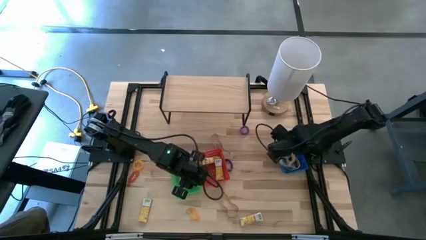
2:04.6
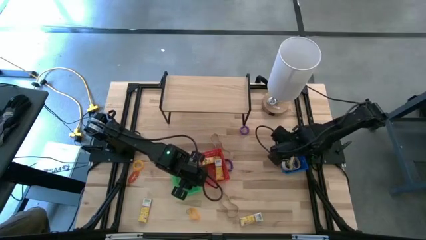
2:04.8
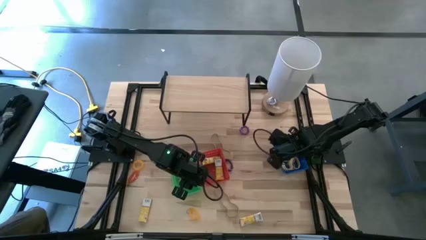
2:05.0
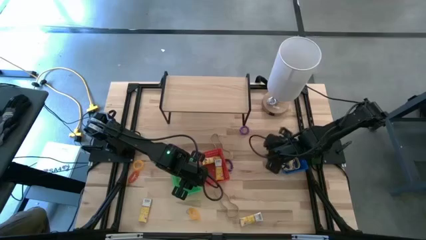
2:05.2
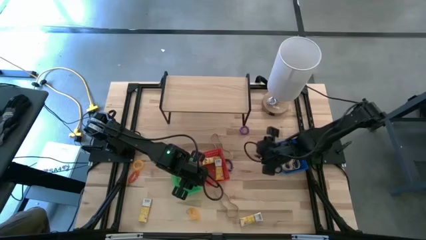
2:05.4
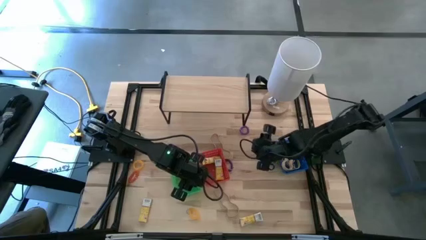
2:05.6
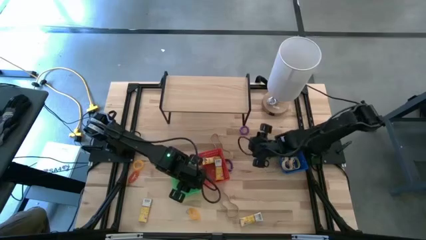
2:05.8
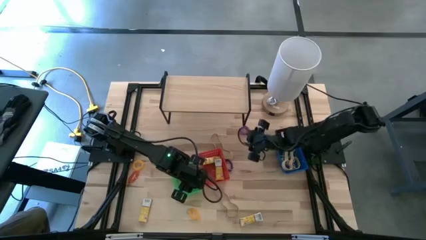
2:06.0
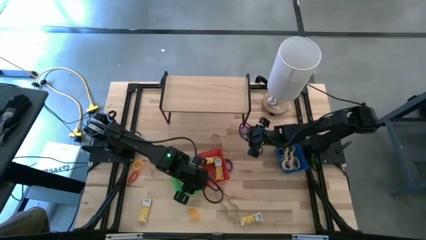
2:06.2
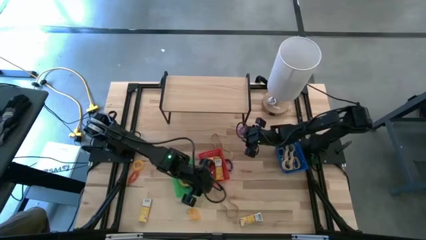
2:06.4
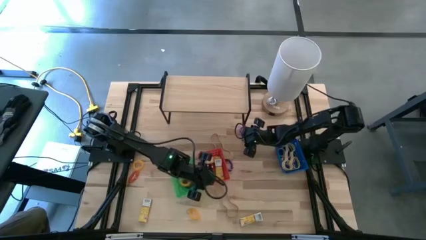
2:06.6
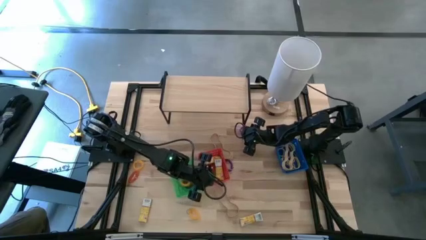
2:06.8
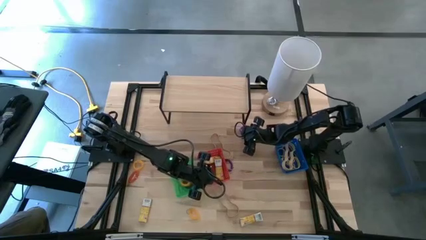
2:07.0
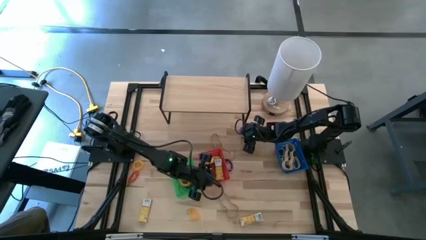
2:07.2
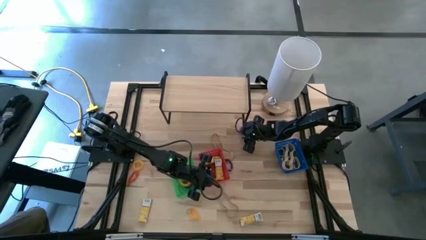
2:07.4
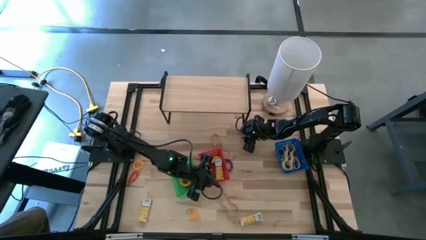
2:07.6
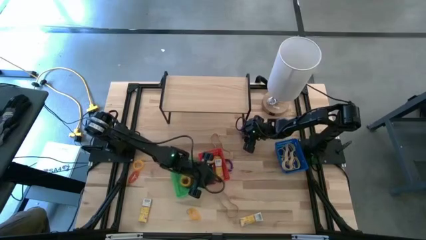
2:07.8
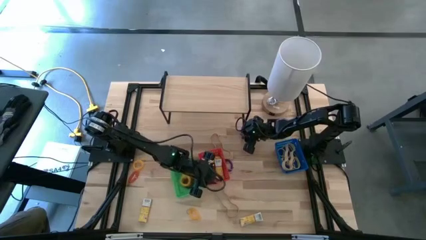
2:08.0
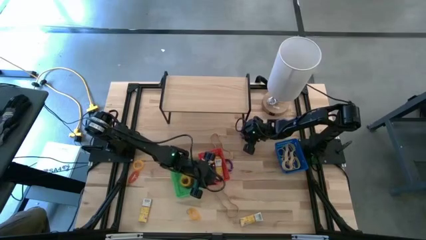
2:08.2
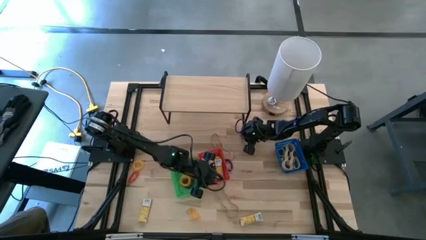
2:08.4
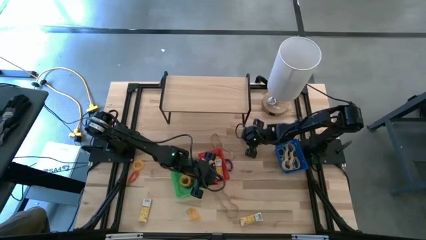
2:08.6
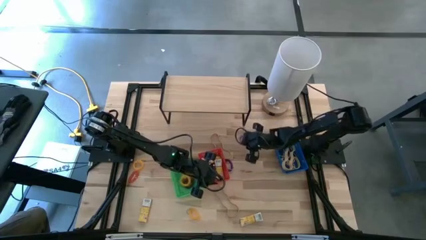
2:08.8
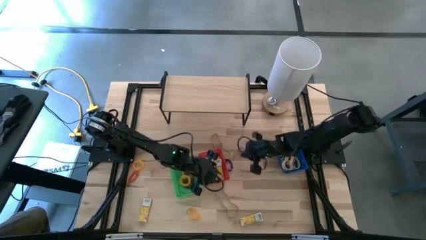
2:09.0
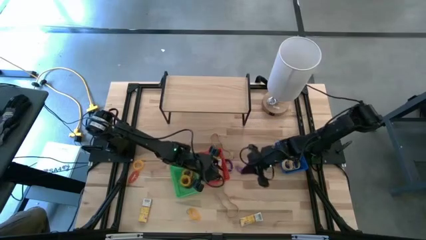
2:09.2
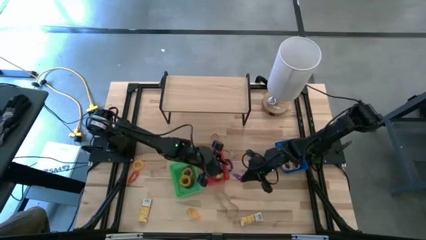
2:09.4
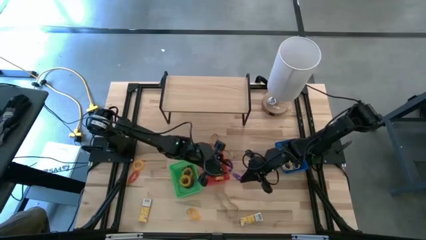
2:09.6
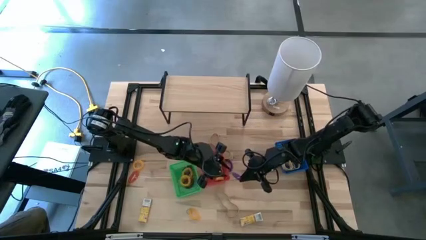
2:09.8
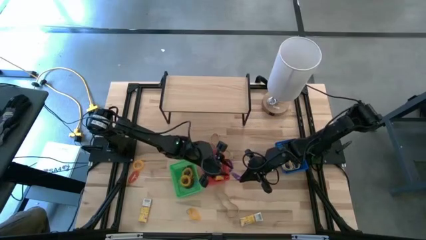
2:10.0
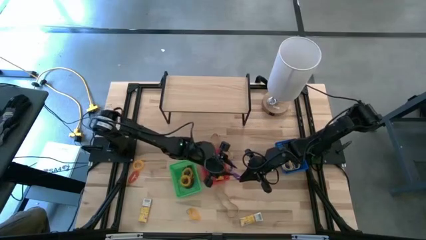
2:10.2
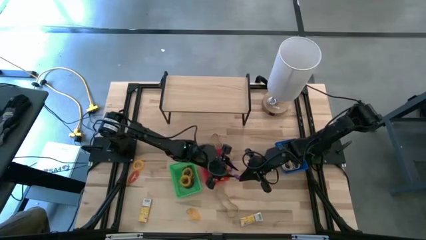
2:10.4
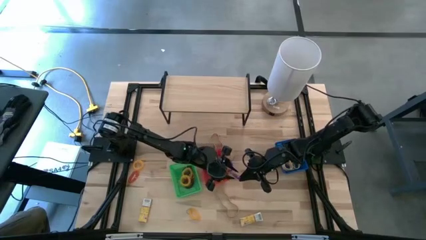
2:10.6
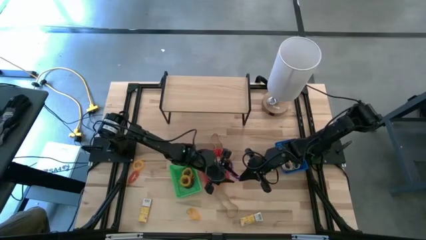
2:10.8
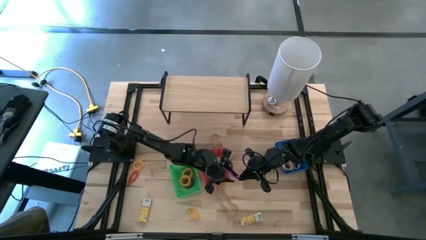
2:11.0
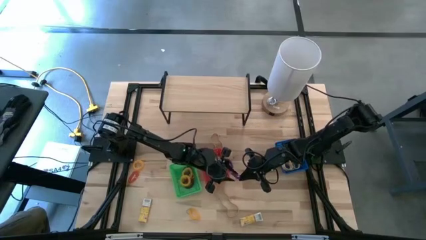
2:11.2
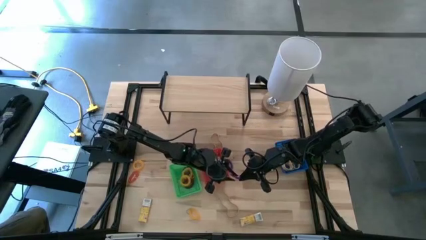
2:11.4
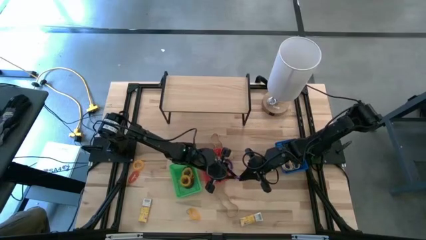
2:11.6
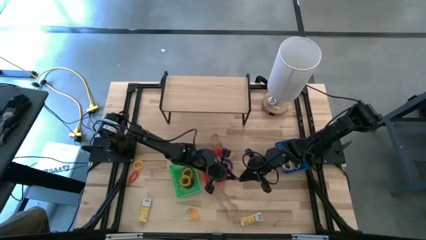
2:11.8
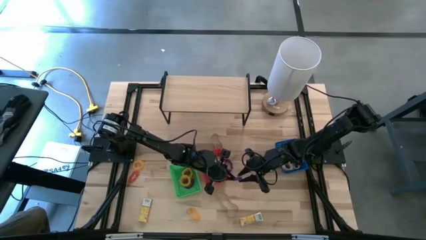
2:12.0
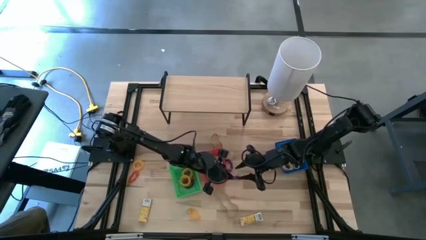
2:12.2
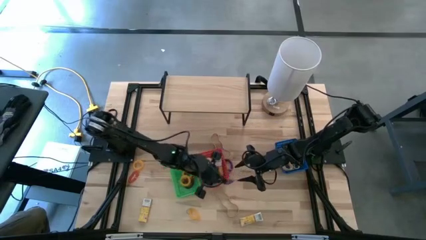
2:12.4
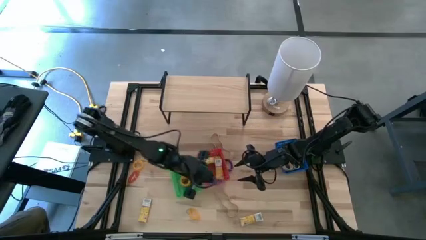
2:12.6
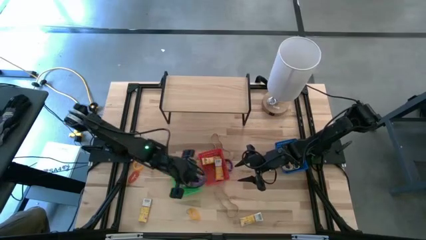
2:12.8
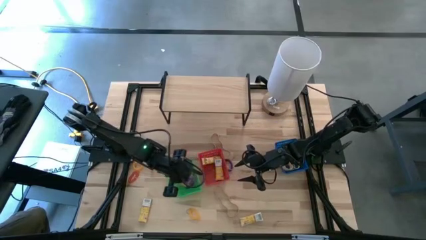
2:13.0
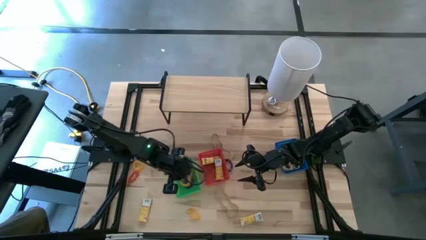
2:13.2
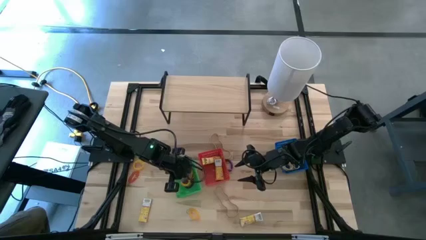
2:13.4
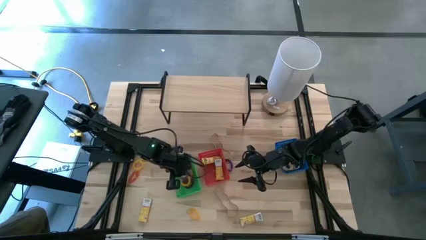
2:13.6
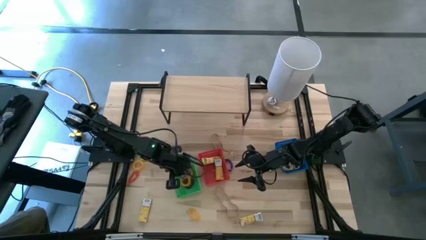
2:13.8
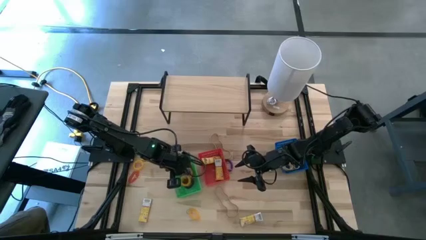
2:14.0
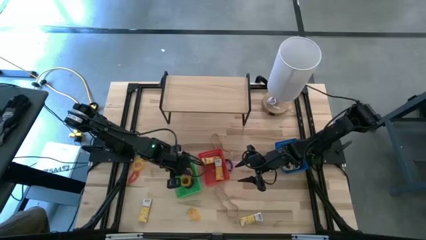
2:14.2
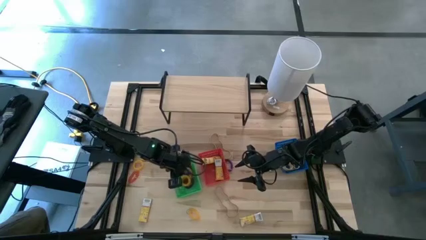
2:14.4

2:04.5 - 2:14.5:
Task: Pick & Place Office Desk Supplies
Put the violet spring keychain into the green bin

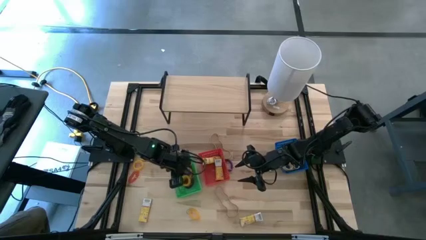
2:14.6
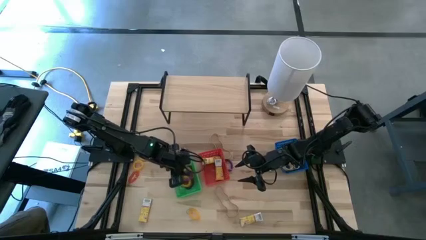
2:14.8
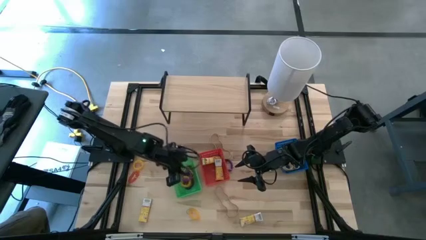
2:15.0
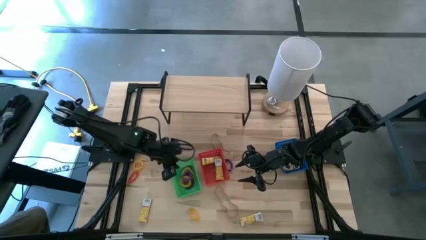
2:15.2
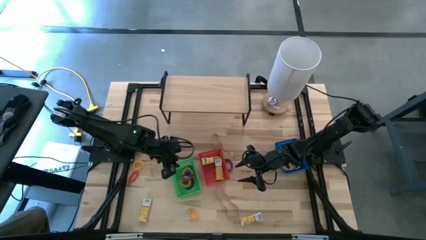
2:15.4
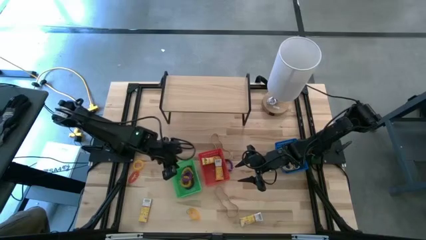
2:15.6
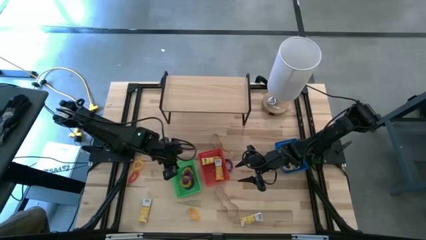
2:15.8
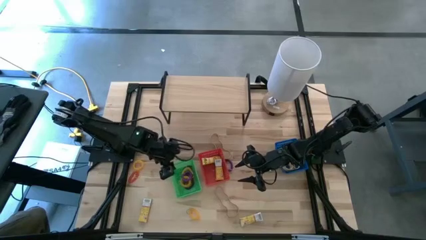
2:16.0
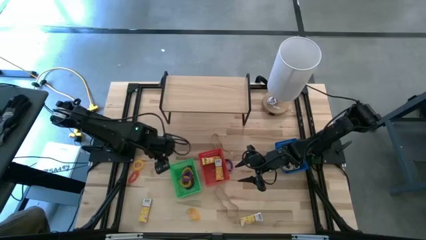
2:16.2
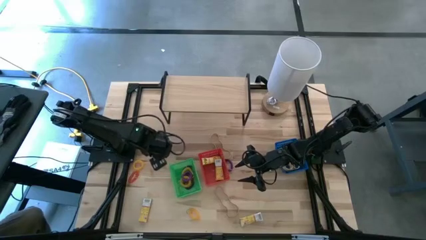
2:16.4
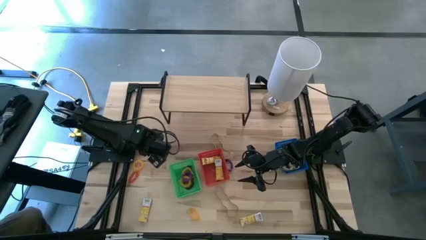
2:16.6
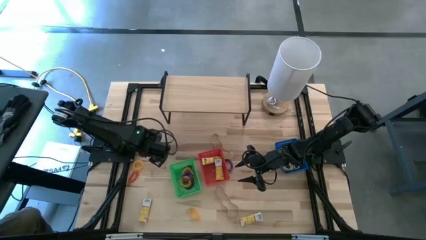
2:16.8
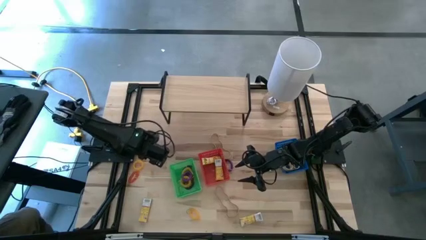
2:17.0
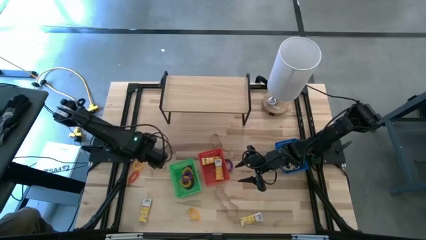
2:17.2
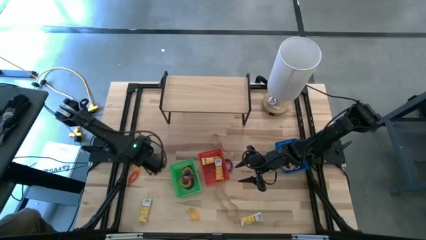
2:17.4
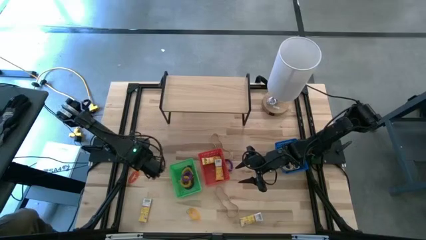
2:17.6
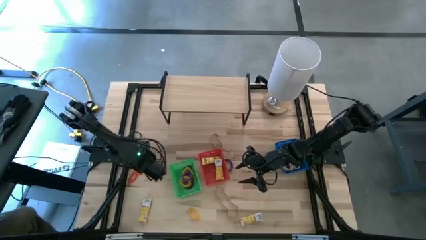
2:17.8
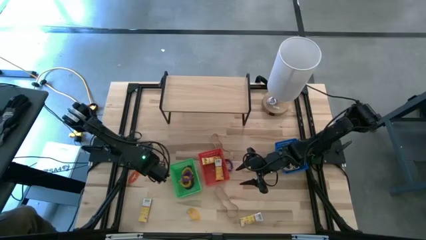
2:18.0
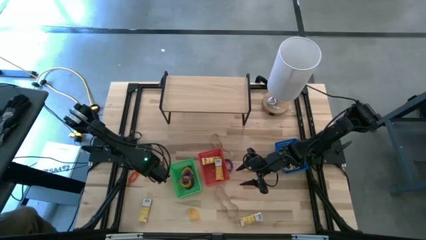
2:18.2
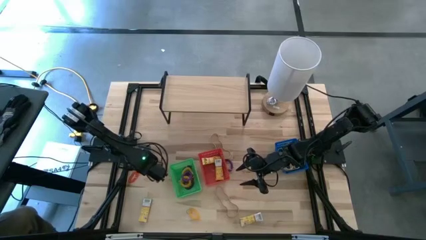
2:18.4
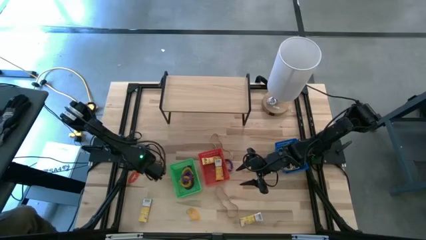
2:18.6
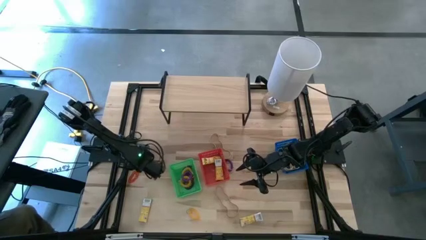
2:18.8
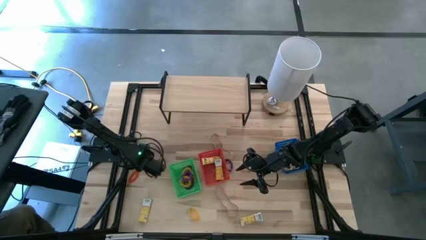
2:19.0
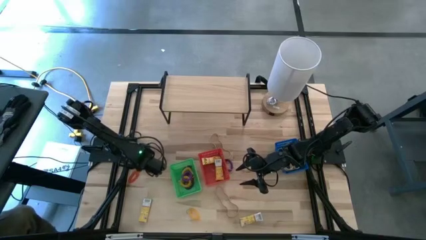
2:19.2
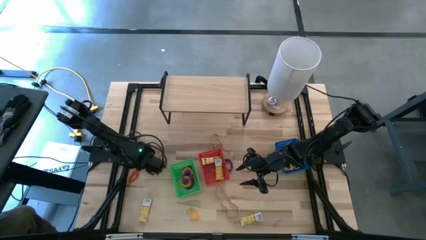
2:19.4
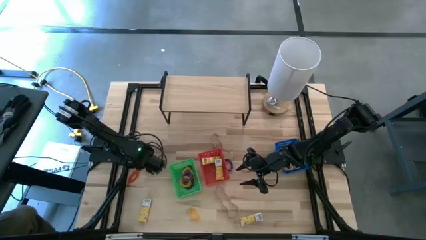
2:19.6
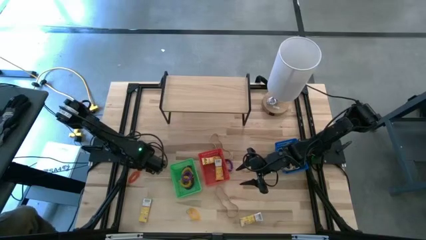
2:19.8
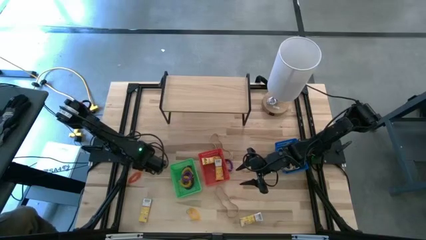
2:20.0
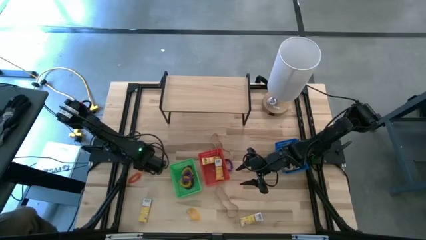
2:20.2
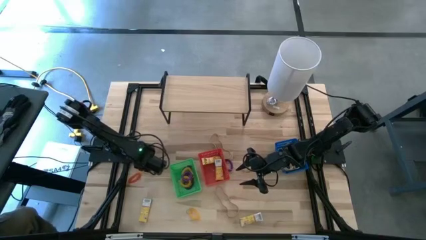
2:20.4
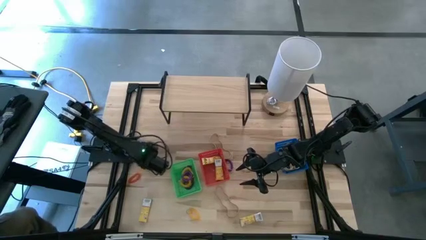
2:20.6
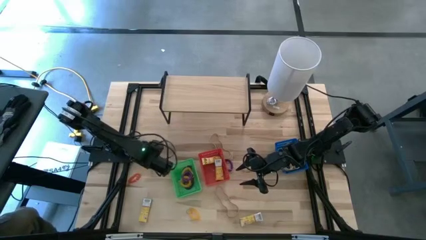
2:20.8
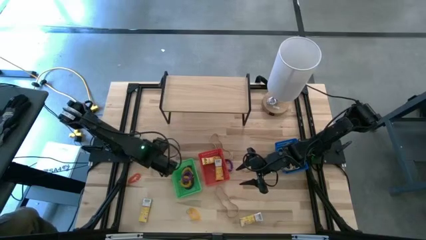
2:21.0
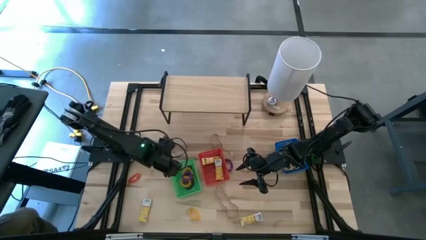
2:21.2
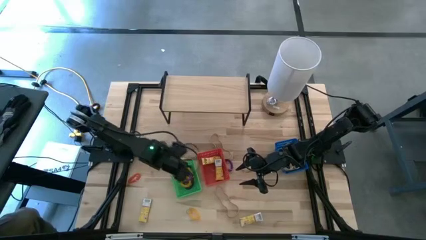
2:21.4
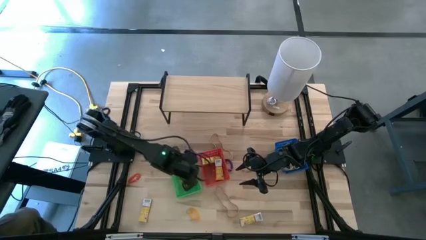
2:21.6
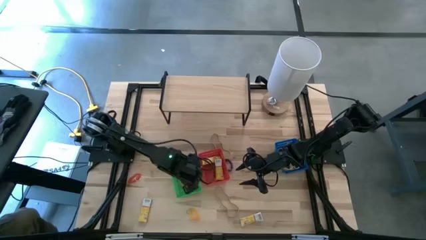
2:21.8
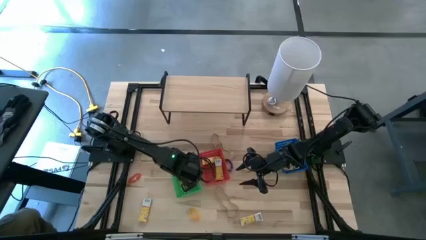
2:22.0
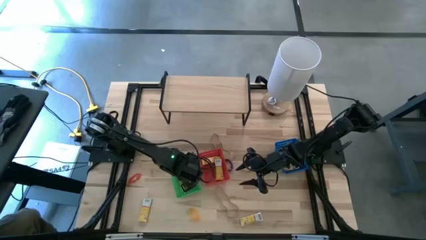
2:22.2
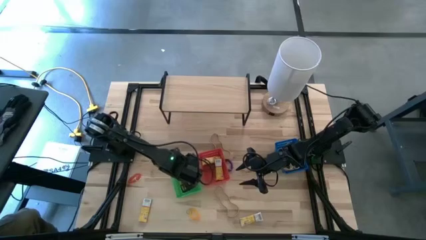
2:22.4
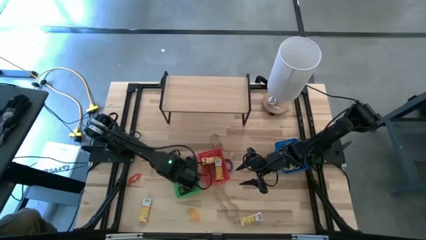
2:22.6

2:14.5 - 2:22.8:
Put the yellow spring keychain into the green bin
